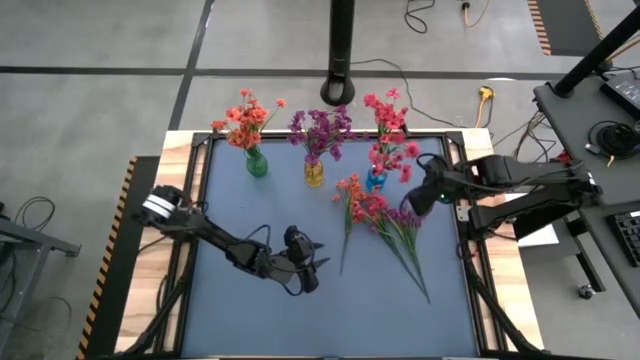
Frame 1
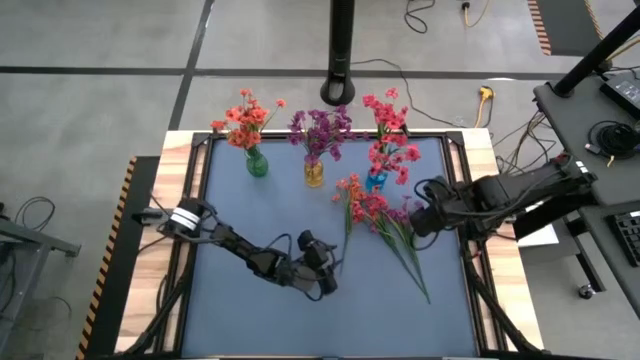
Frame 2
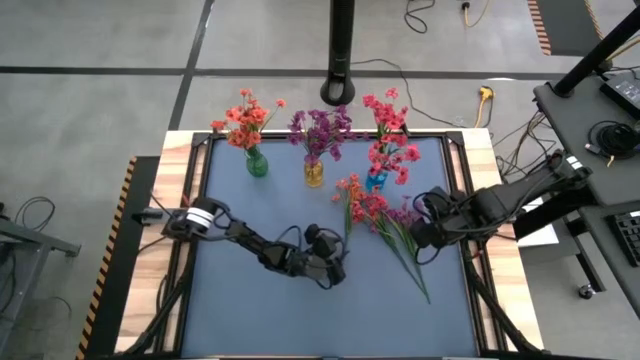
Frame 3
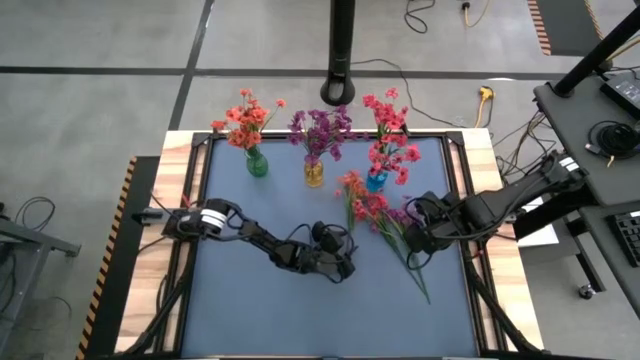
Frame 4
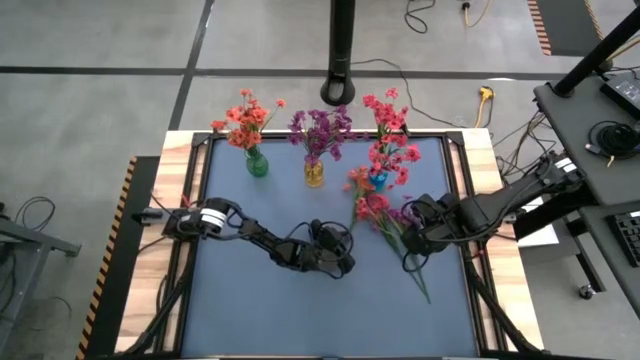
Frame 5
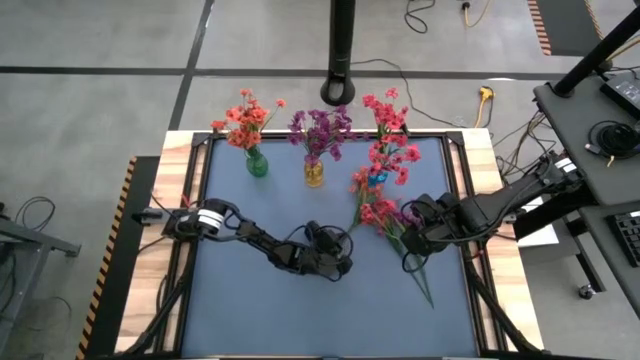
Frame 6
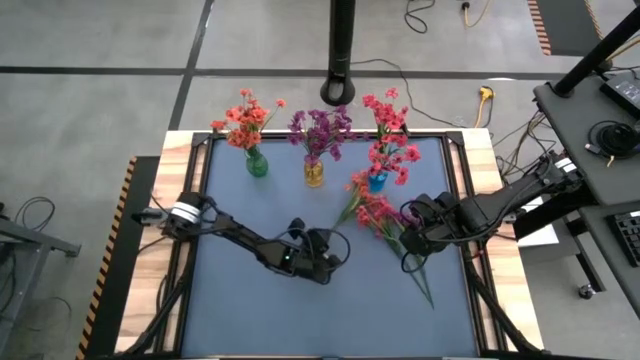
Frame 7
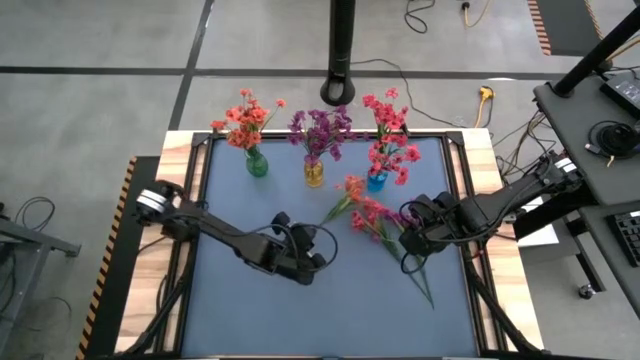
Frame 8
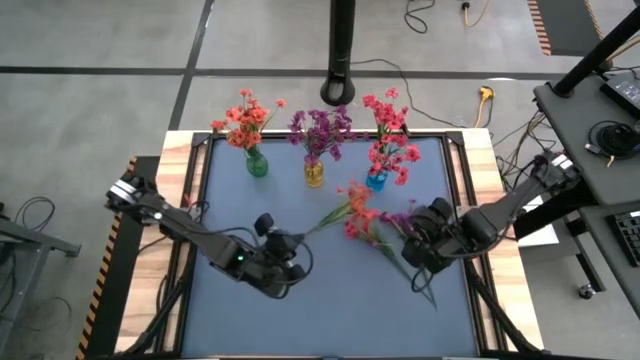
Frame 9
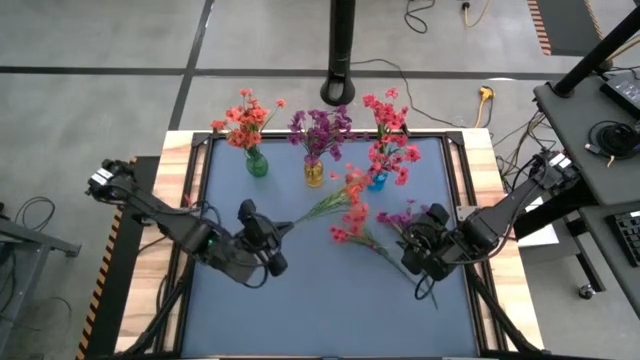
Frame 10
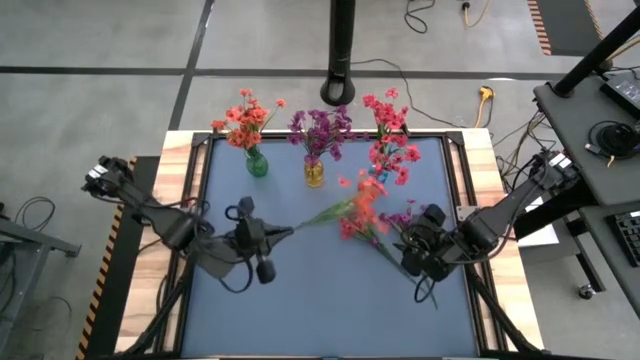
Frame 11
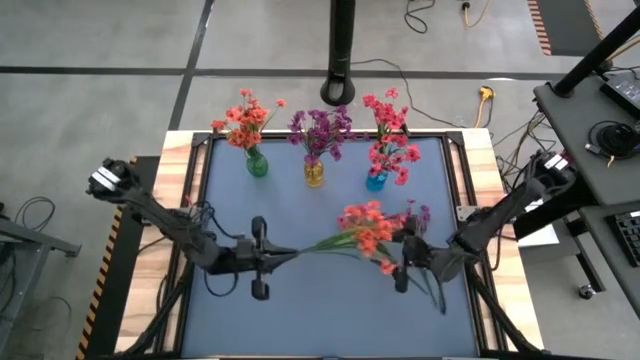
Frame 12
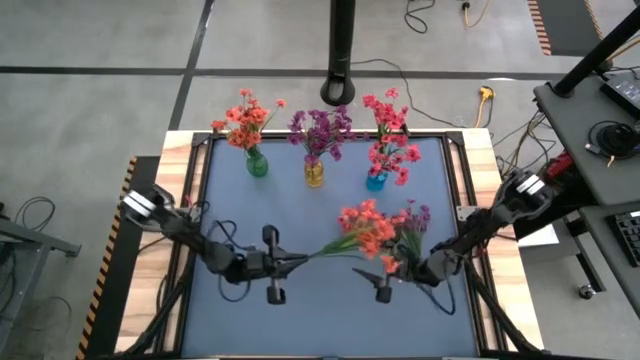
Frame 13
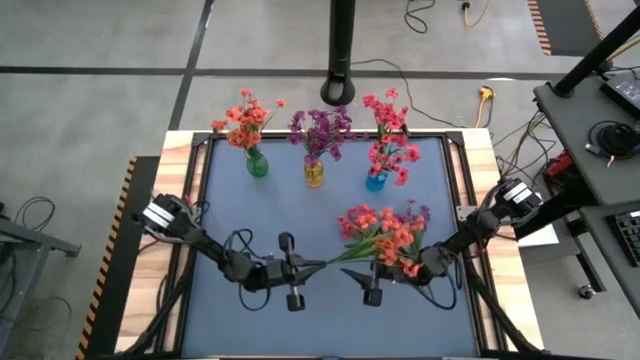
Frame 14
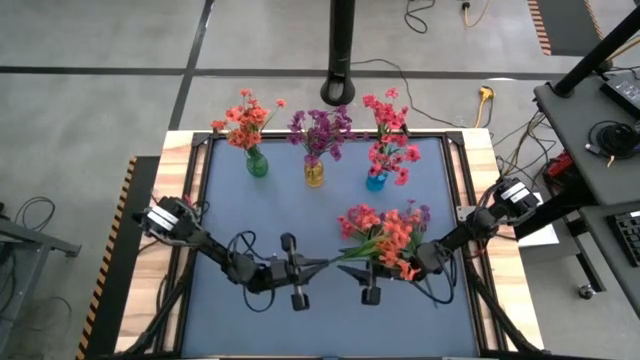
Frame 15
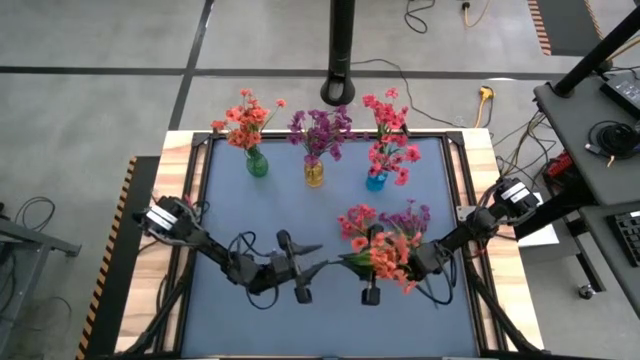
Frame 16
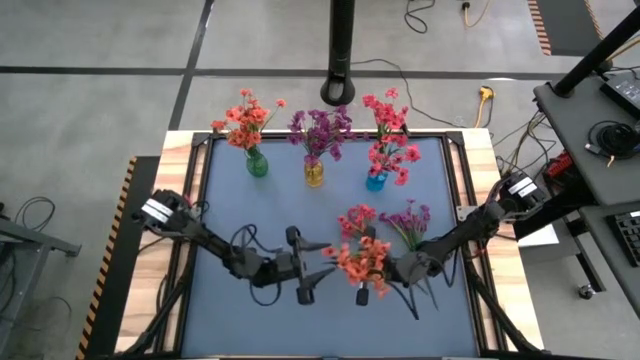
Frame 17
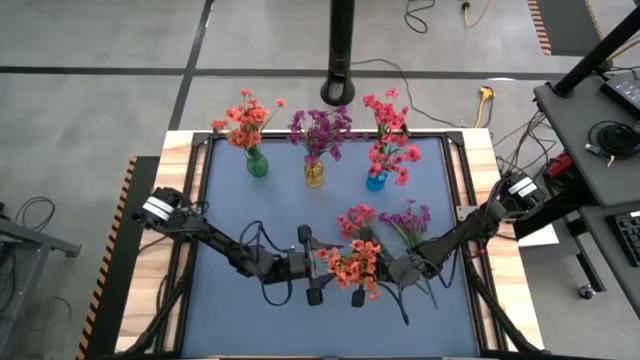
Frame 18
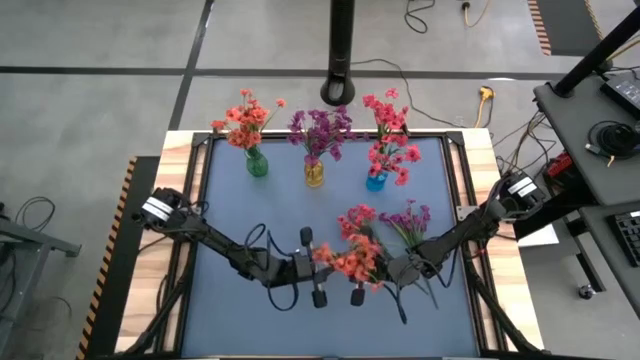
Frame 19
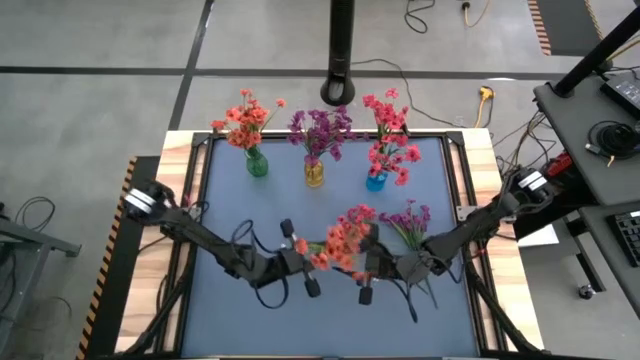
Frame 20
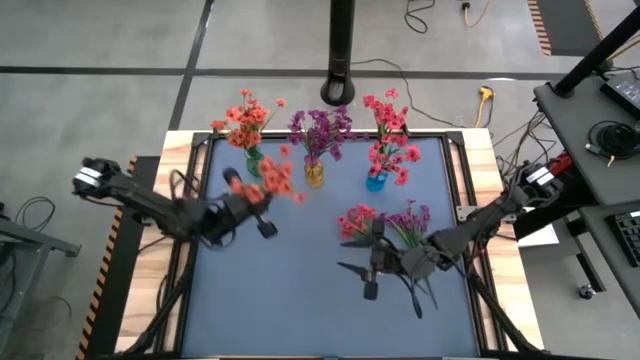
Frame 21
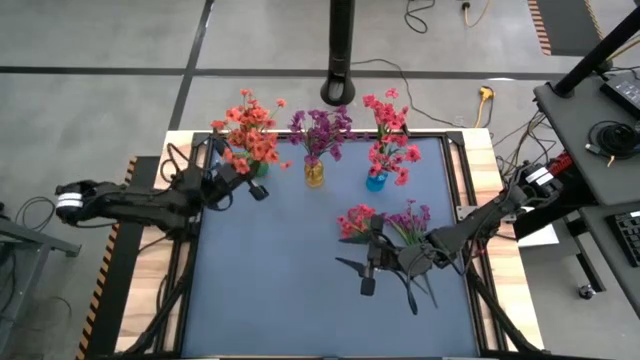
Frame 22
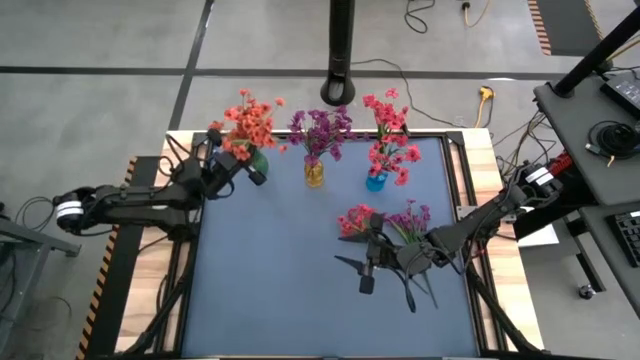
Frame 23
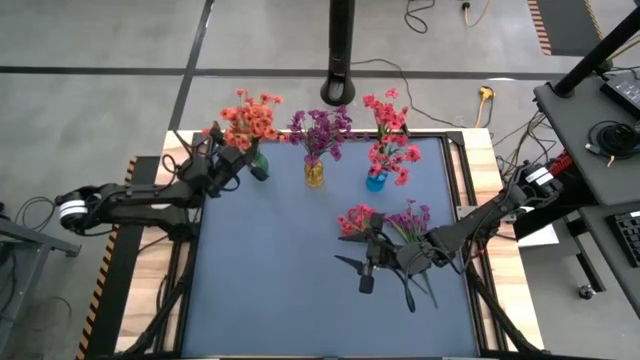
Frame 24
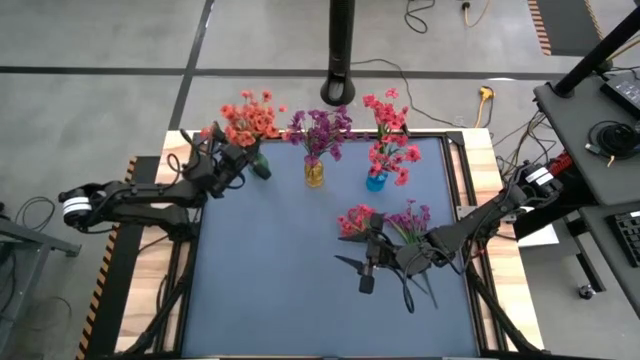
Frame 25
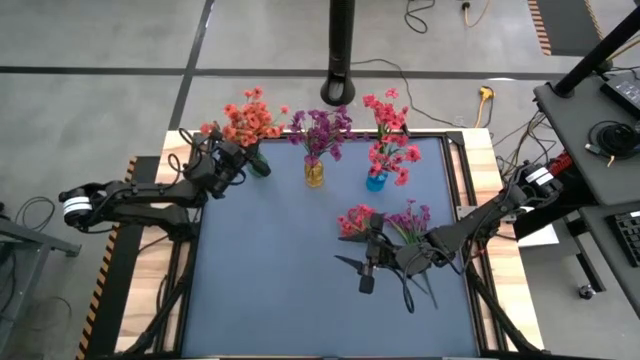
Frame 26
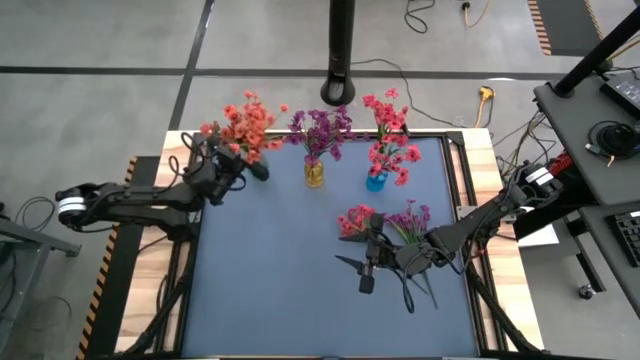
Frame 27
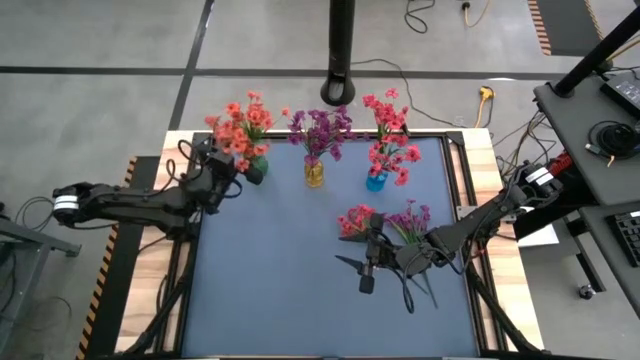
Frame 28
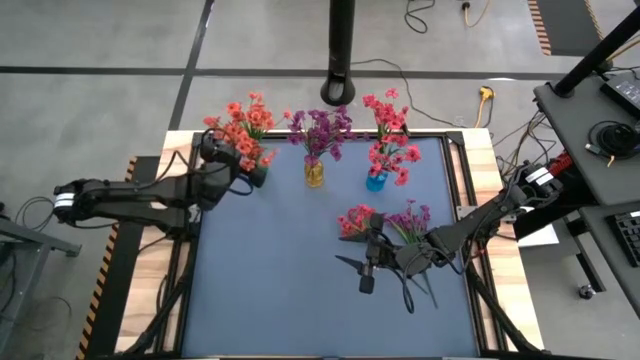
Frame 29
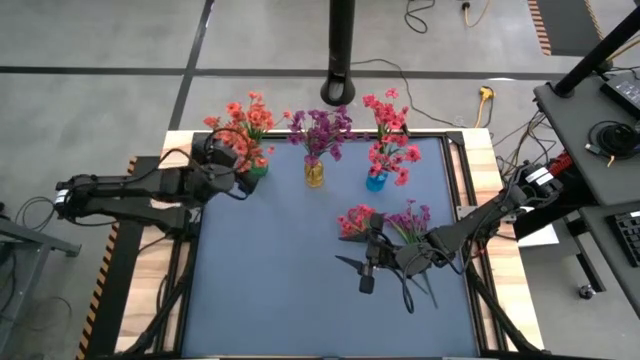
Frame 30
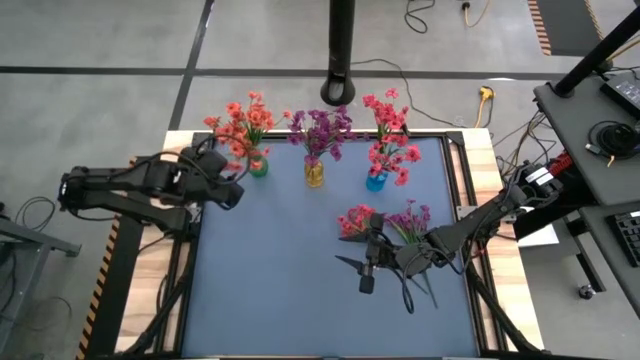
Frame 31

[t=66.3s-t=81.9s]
Task: Sort flowers into vase by color
Put the orange flowers into the green vase

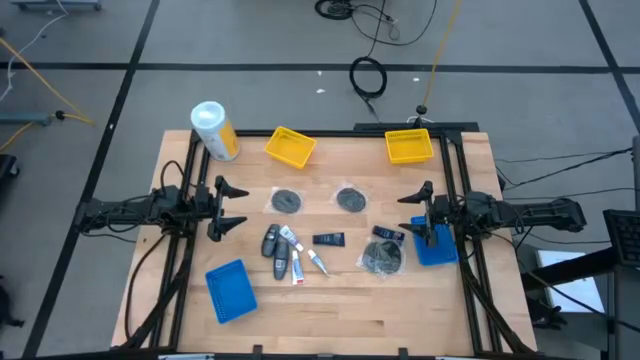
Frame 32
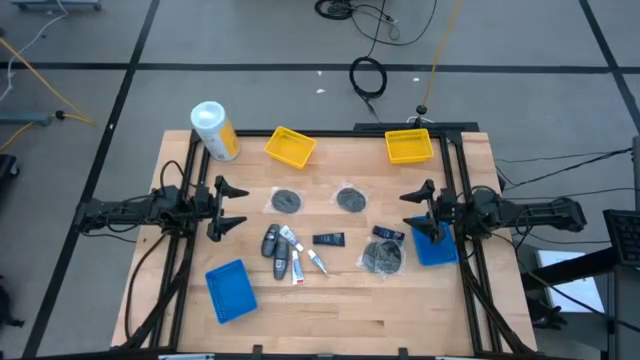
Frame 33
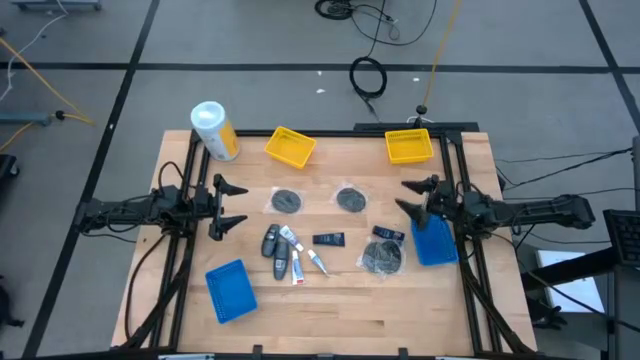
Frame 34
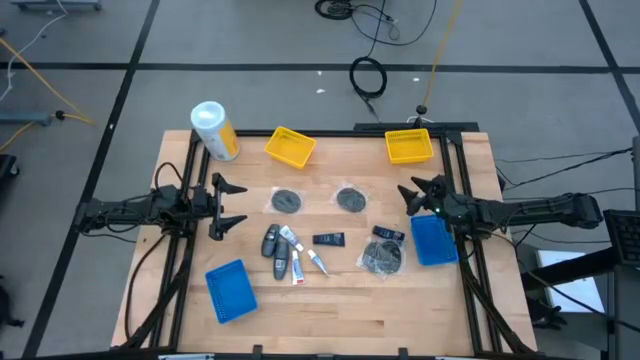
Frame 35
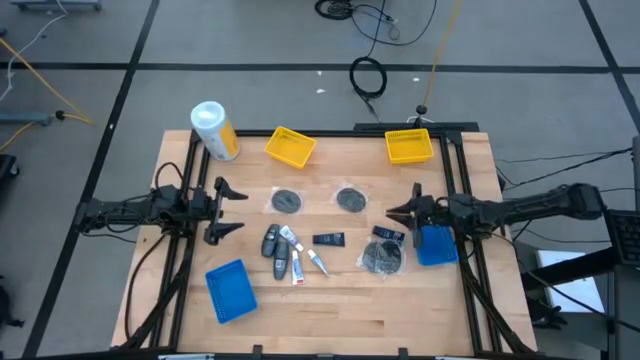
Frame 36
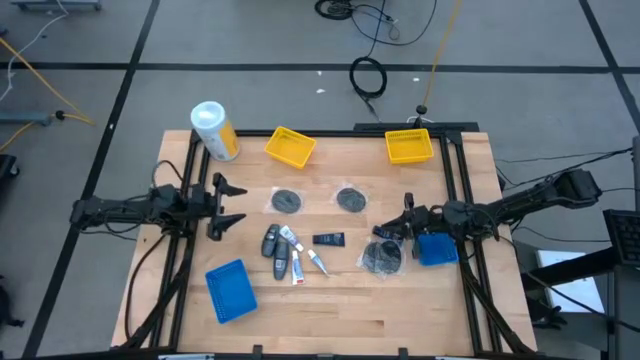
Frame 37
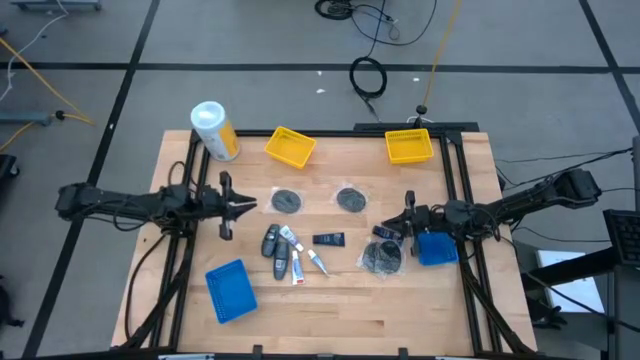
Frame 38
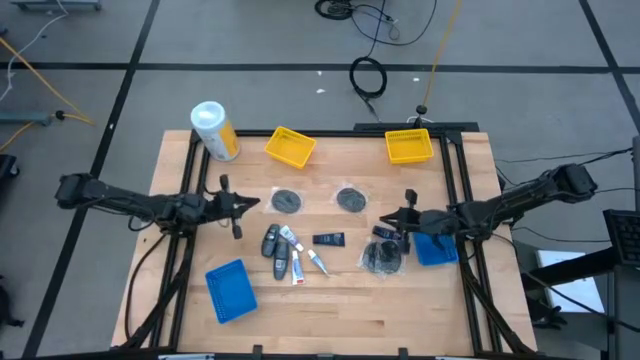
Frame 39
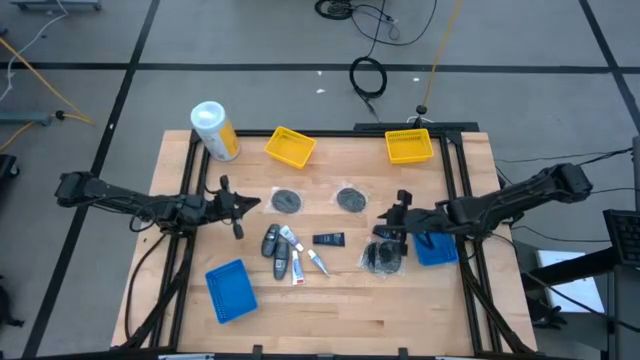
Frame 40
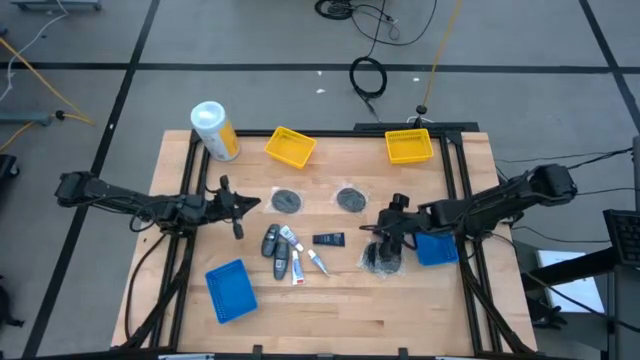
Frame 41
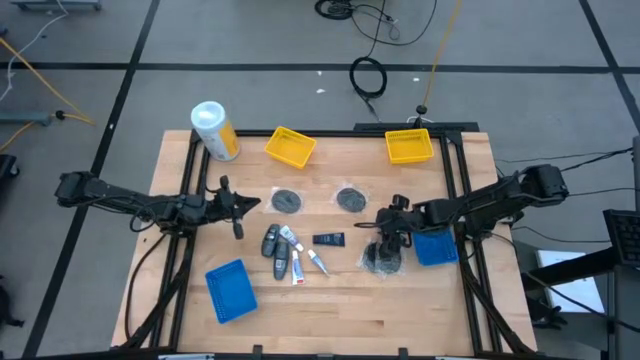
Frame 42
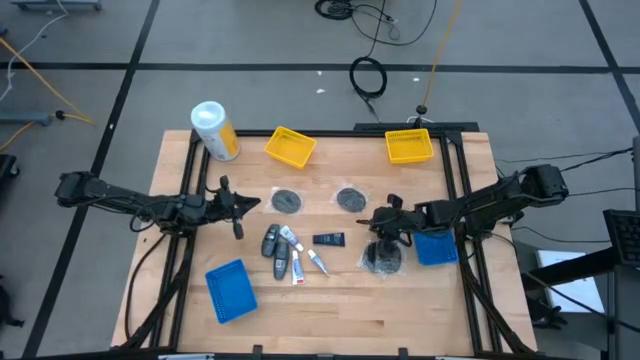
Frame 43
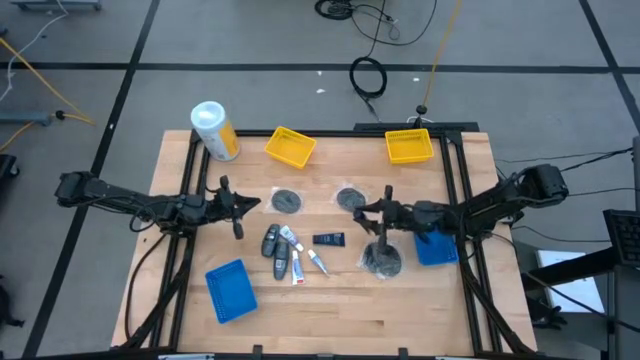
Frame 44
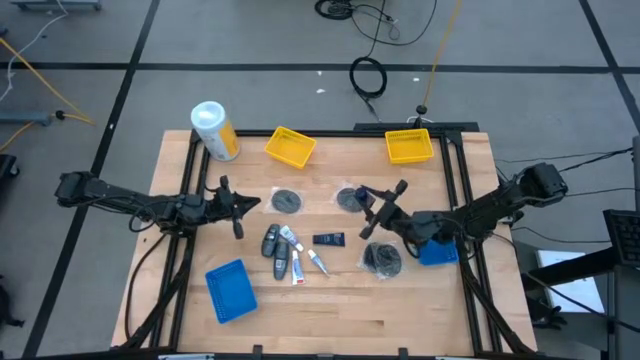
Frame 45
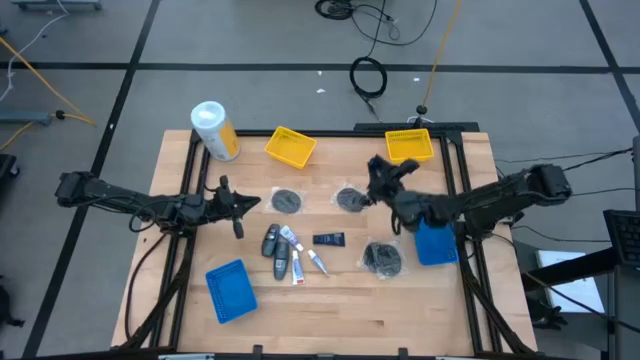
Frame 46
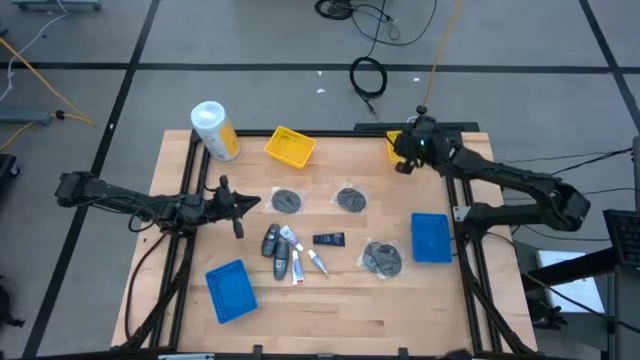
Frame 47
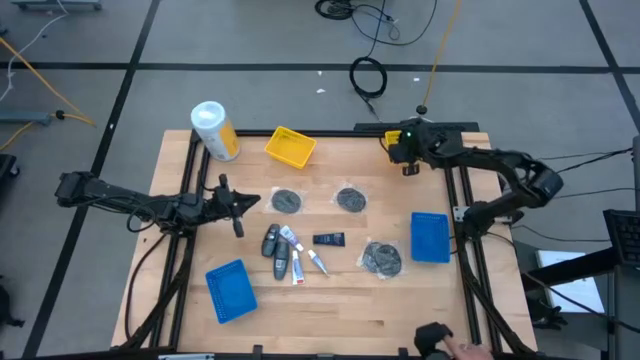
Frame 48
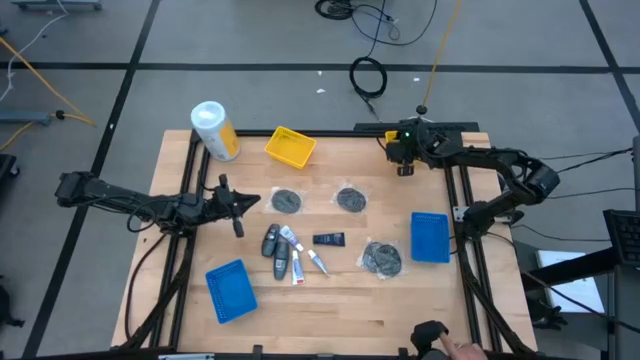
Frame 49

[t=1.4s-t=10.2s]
Task: Pick & Place Travel size toiletries
Put the dark blue shaving cream into the right yellow bin
